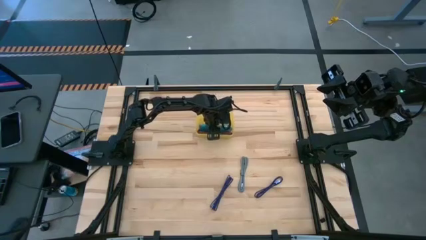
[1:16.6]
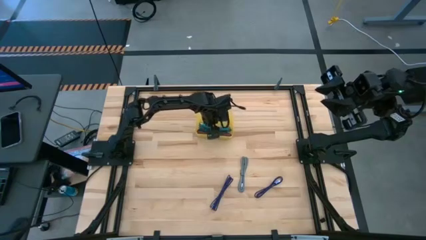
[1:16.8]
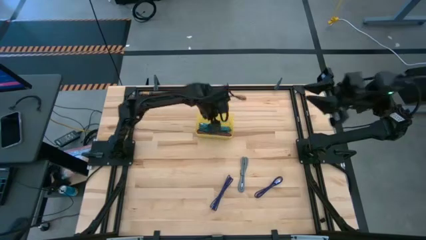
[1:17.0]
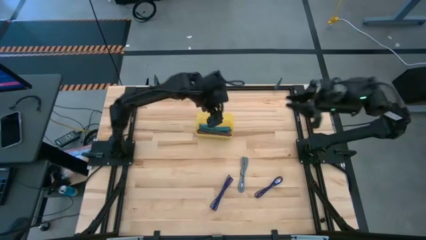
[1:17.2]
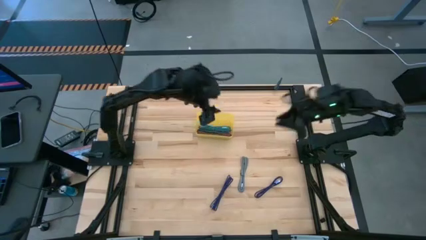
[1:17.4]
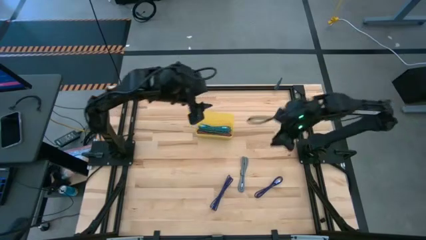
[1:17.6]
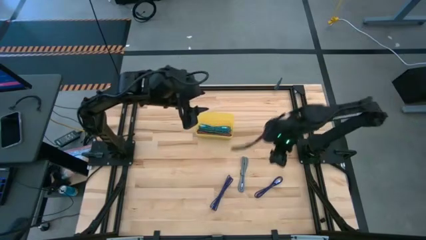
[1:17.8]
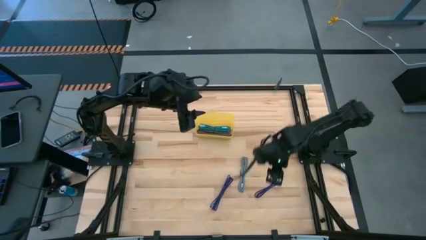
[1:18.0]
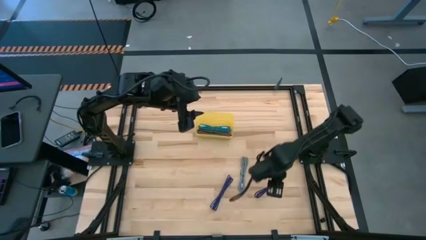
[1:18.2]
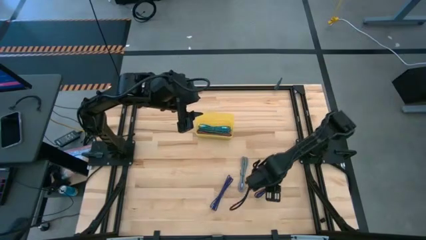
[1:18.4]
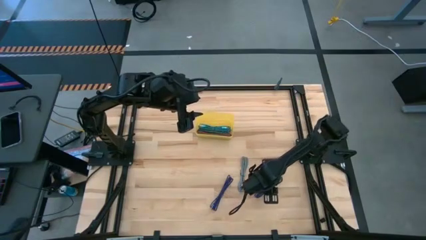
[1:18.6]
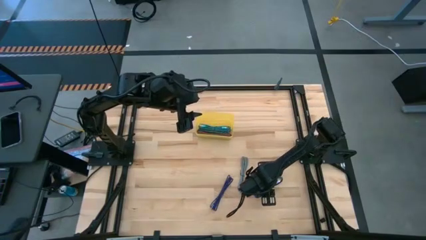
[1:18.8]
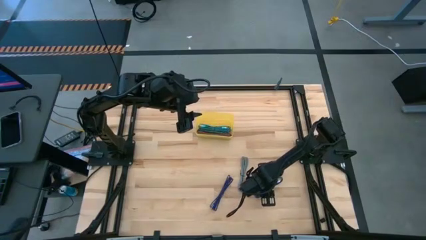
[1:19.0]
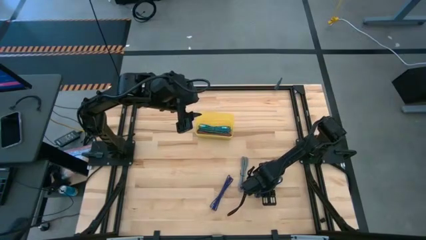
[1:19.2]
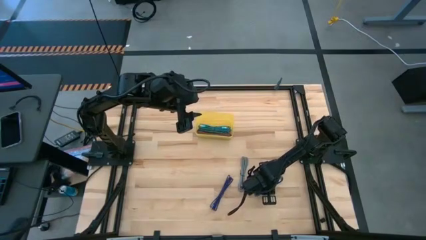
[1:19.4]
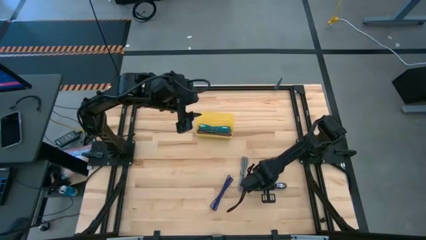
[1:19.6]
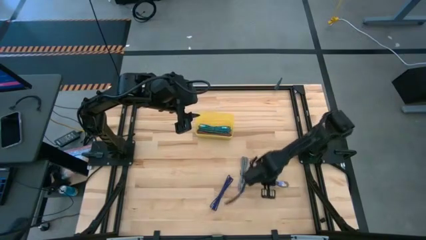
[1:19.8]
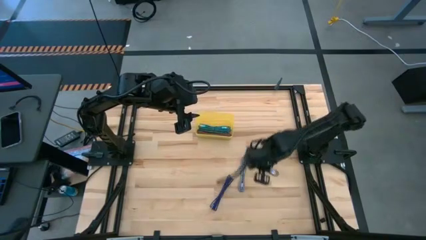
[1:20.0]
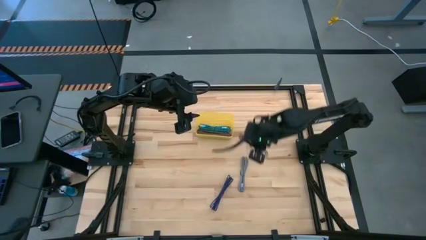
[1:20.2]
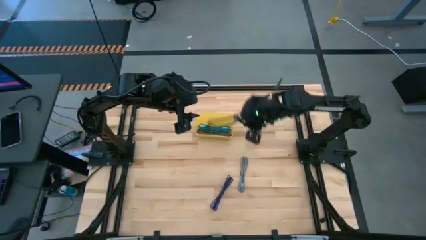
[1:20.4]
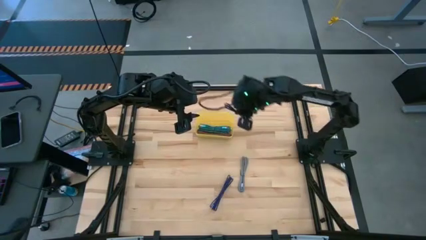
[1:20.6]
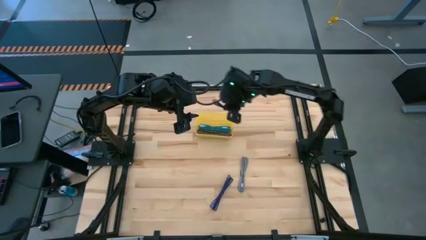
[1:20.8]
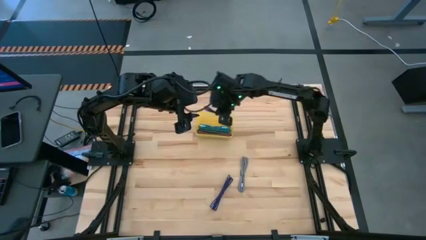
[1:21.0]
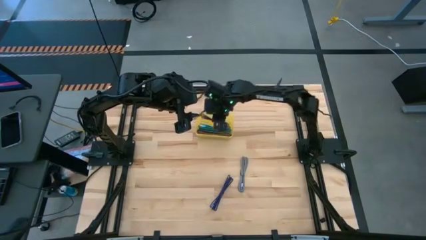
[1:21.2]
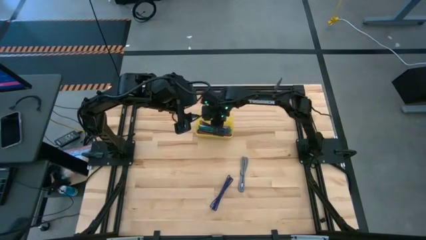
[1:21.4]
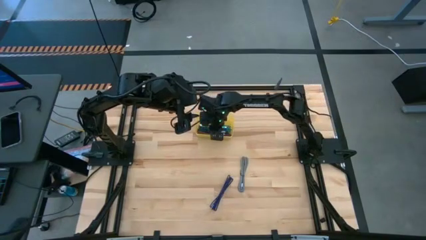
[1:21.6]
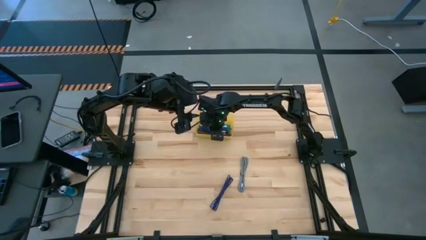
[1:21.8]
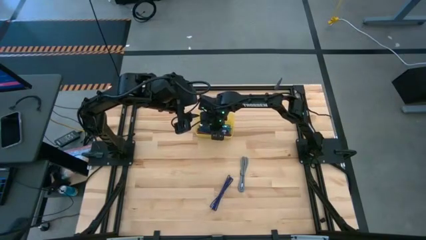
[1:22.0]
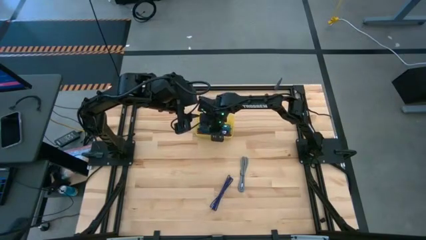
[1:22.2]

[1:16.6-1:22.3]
Task: Pick and place USB-C Cables
Put the right violet charger cable into the bin

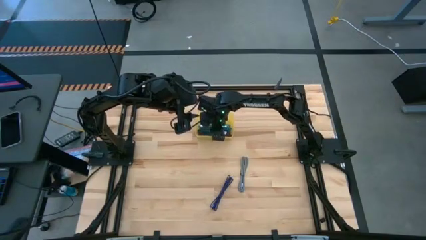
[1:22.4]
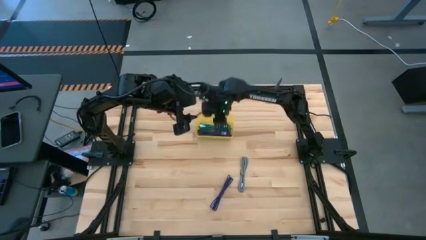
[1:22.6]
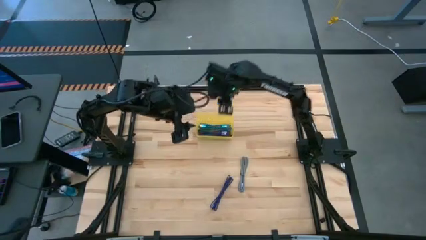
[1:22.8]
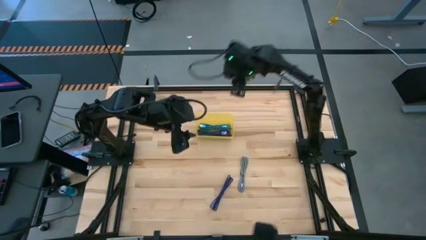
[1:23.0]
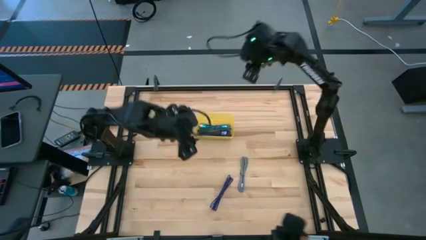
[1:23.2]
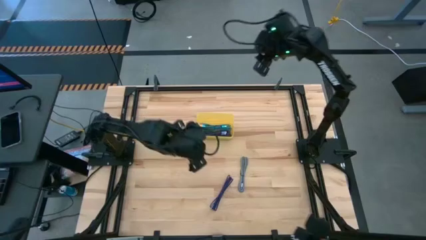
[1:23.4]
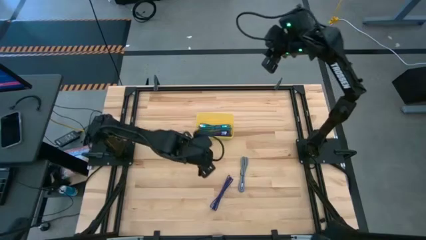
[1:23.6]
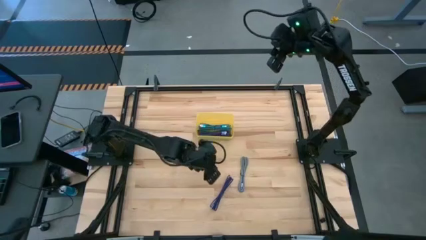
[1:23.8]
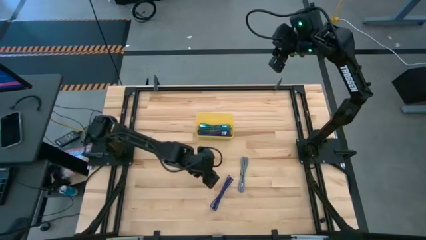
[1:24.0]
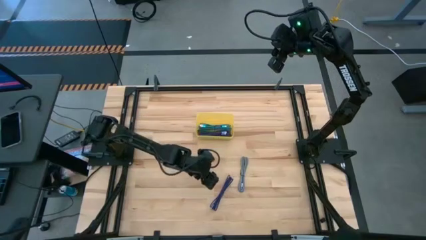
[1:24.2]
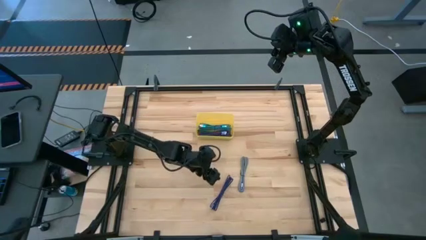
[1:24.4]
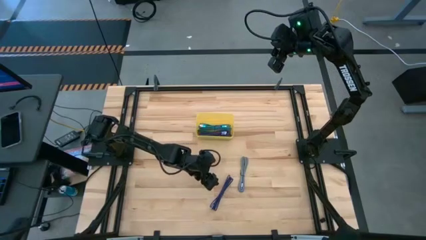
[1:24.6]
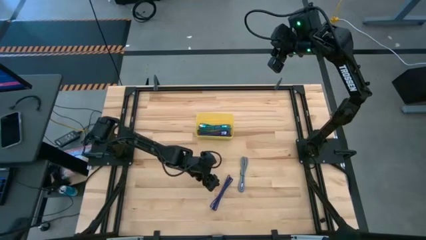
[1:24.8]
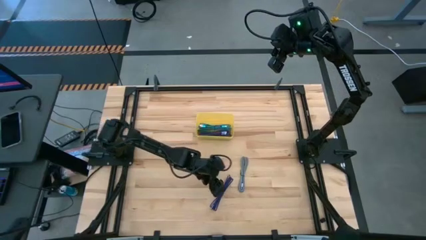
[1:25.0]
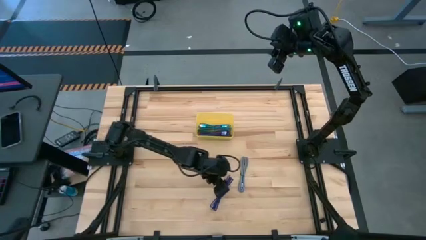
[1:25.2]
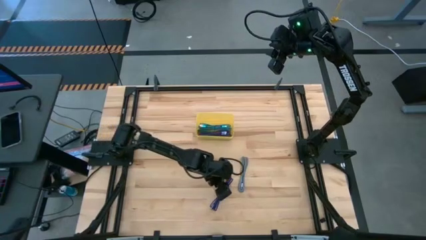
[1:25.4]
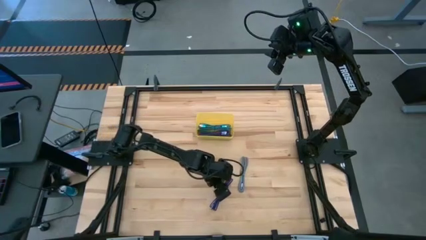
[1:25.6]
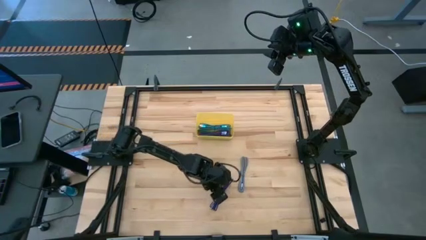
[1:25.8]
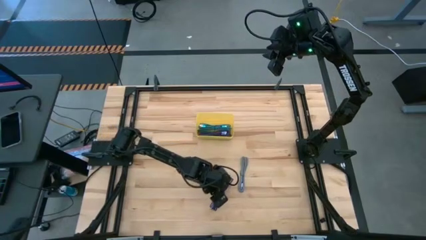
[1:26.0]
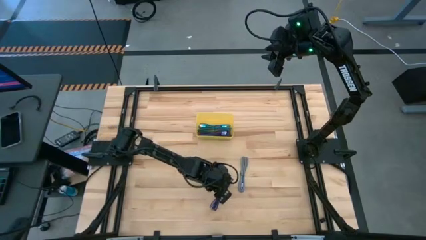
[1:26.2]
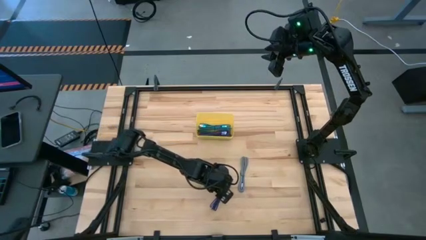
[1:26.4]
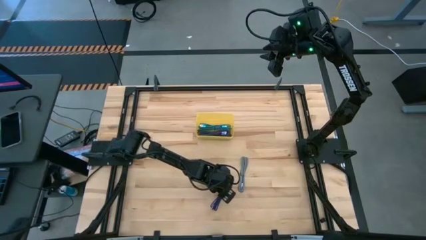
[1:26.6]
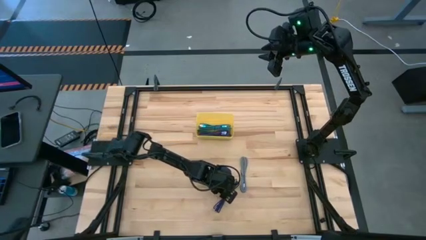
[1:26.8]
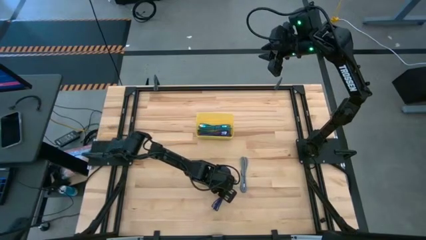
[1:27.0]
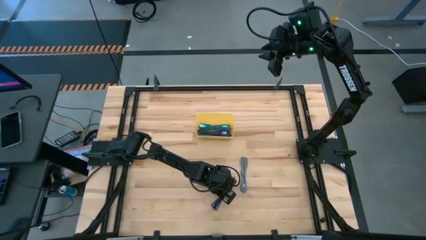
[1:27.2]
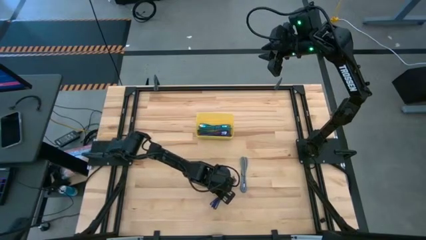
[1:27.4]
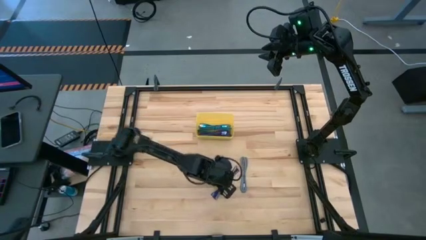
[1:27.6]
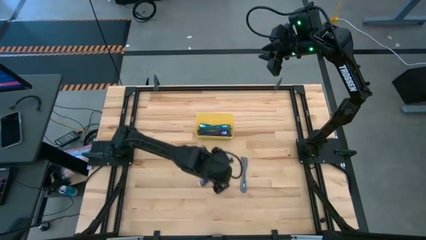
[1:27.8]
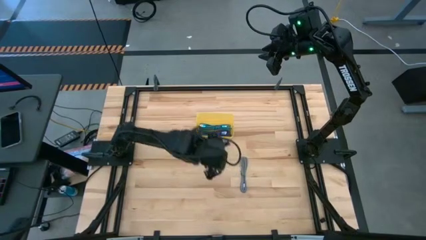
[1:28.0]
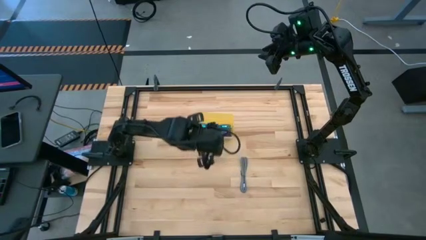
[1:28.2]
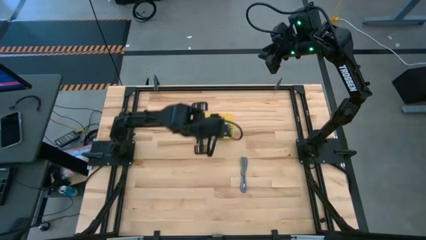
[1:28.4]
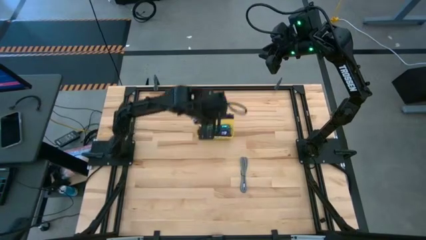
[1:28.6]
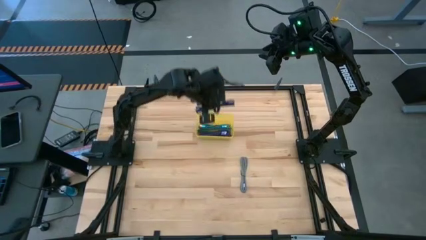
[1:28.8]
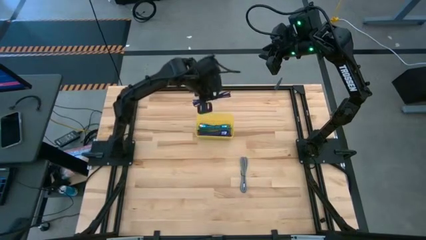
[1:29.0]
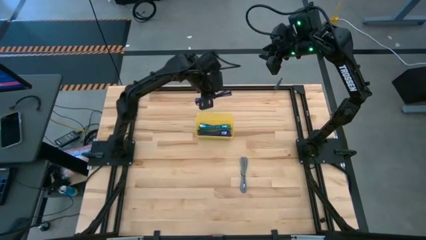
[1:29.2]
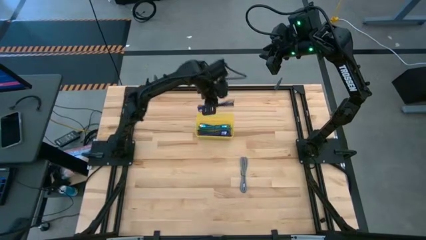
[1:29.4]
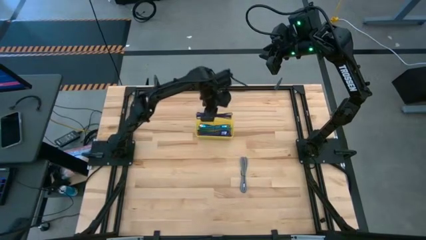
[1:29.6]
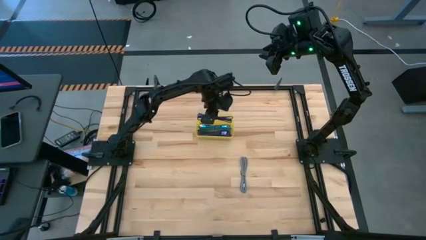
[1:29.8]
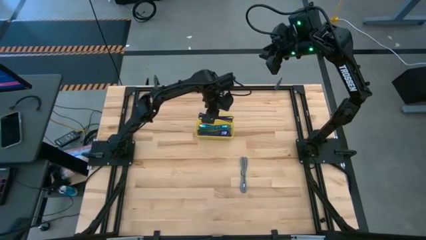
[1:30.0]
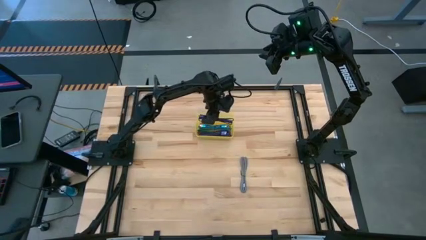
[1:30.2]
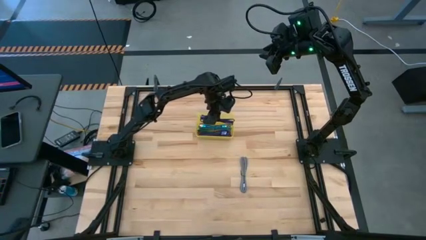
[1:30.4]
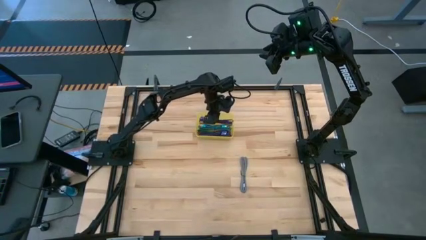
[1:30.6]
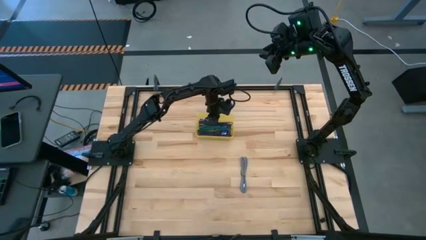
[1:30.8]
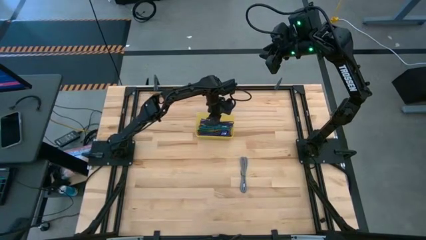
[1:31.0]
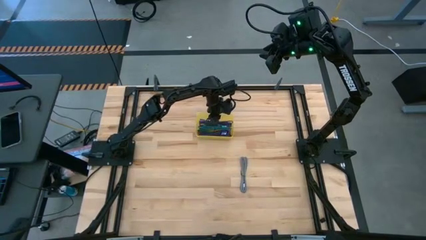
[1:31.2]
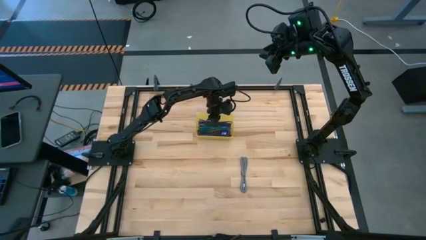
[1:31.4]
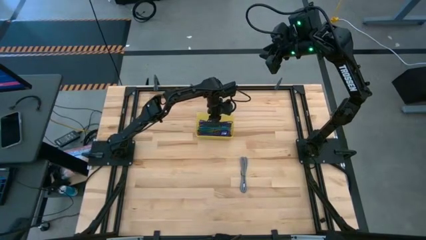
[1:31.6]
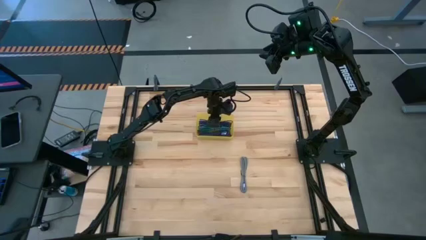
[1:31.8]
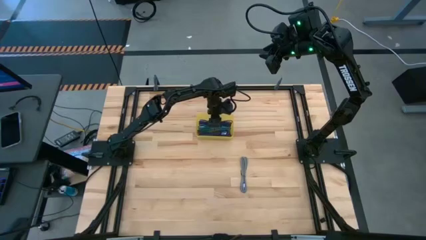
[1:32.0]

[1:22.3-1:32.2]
Put the violet charger cable into the bin
